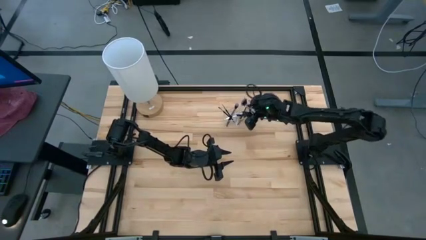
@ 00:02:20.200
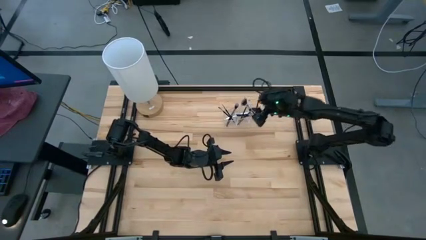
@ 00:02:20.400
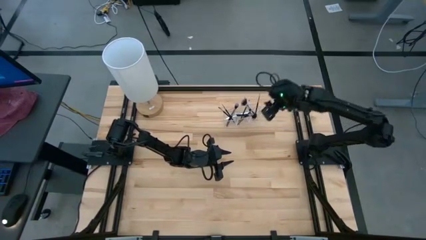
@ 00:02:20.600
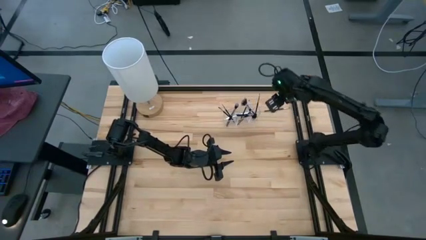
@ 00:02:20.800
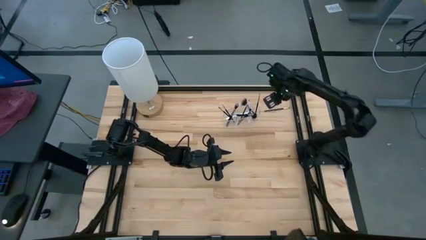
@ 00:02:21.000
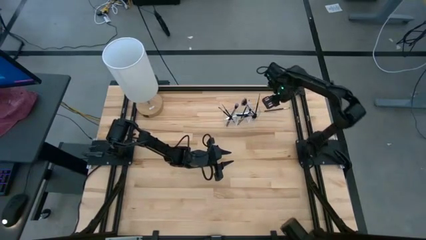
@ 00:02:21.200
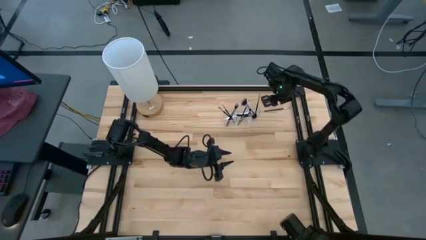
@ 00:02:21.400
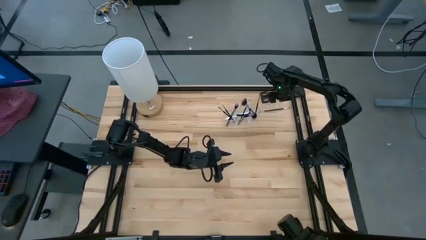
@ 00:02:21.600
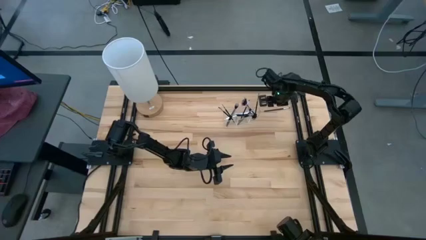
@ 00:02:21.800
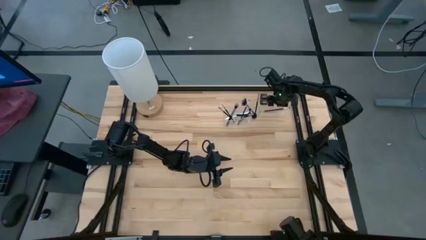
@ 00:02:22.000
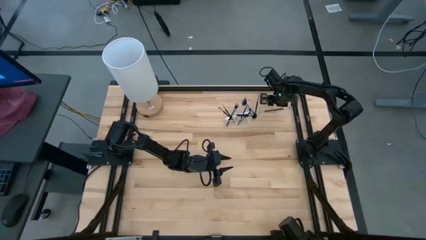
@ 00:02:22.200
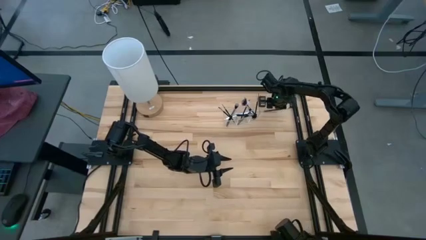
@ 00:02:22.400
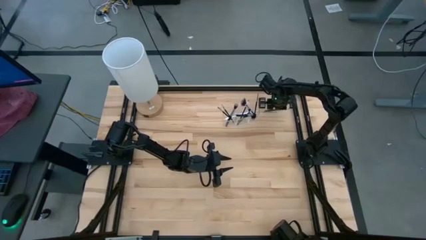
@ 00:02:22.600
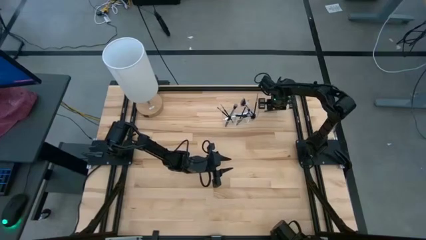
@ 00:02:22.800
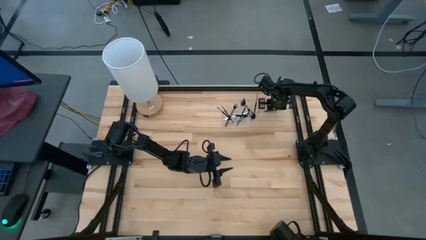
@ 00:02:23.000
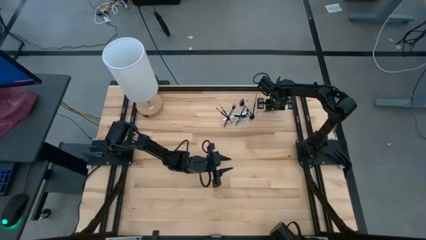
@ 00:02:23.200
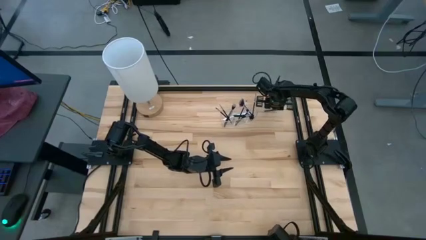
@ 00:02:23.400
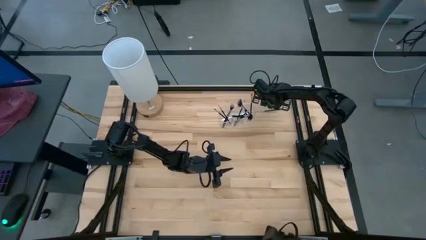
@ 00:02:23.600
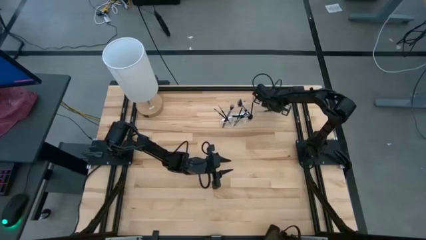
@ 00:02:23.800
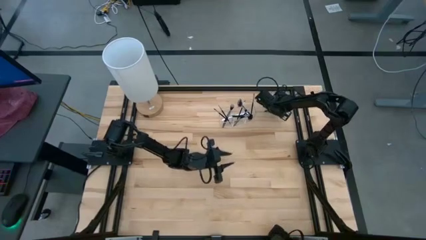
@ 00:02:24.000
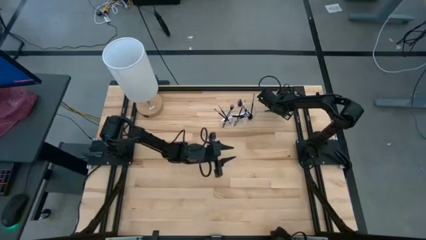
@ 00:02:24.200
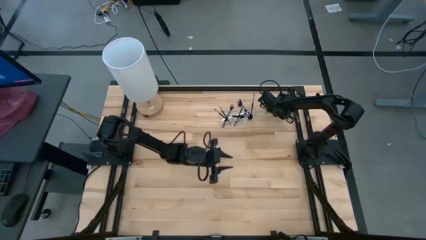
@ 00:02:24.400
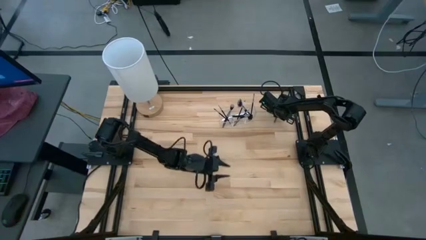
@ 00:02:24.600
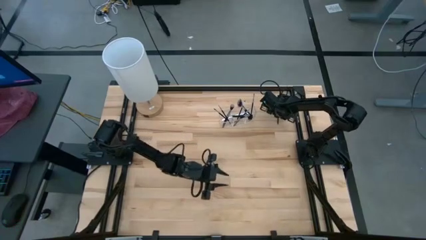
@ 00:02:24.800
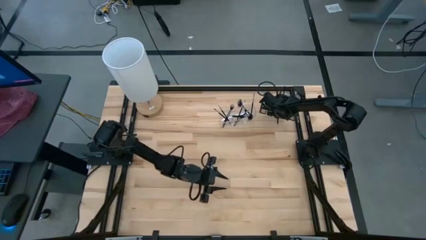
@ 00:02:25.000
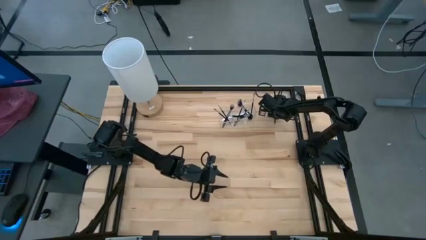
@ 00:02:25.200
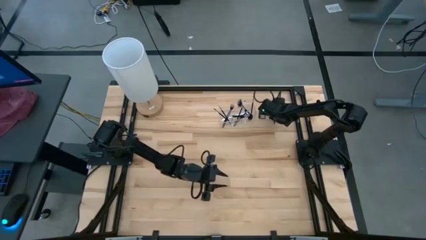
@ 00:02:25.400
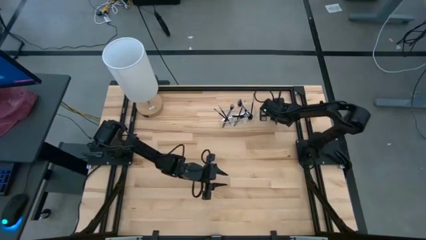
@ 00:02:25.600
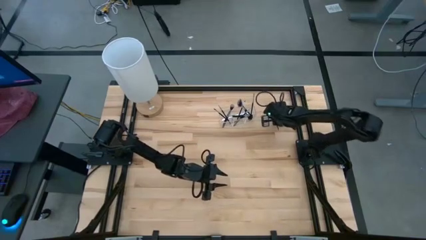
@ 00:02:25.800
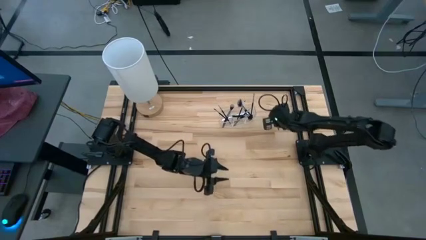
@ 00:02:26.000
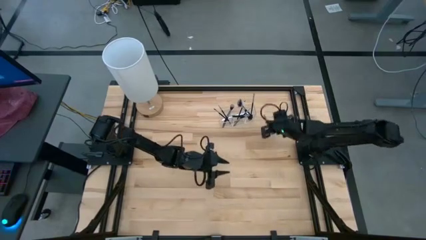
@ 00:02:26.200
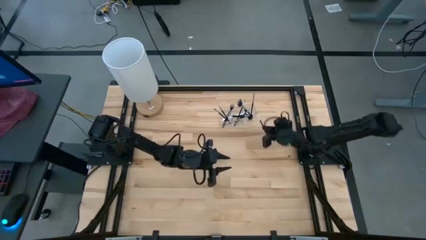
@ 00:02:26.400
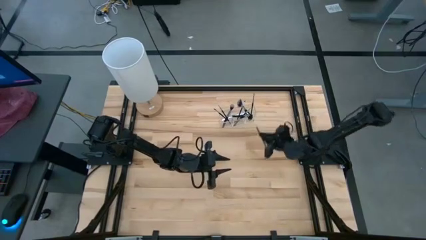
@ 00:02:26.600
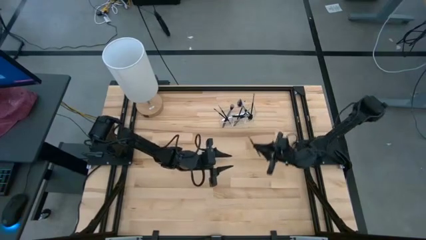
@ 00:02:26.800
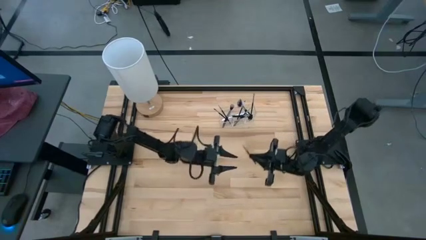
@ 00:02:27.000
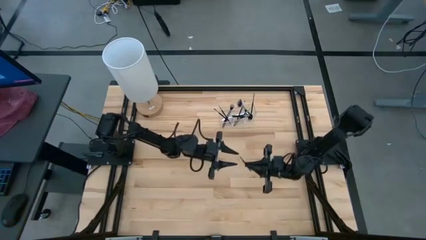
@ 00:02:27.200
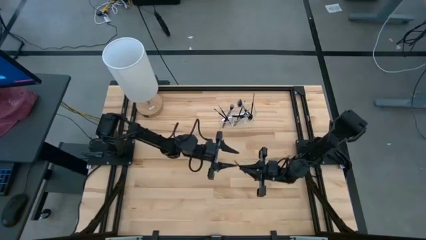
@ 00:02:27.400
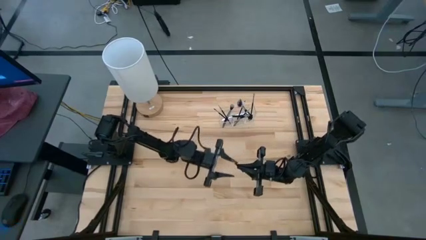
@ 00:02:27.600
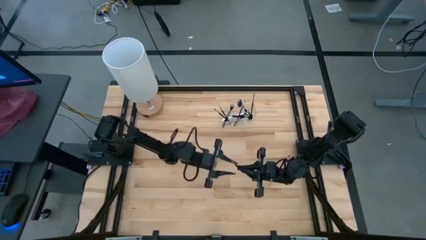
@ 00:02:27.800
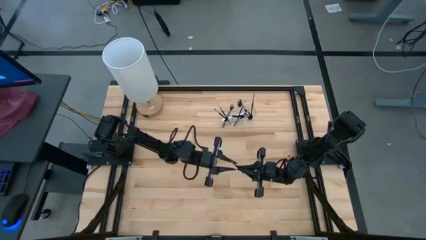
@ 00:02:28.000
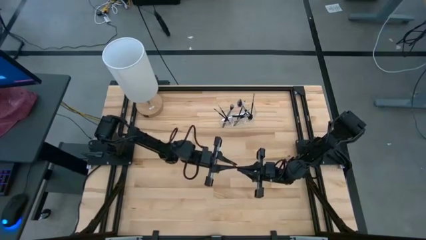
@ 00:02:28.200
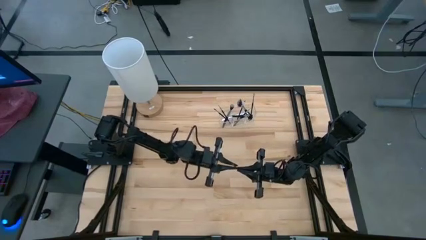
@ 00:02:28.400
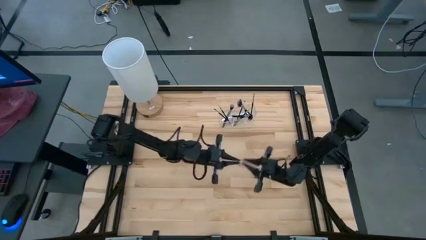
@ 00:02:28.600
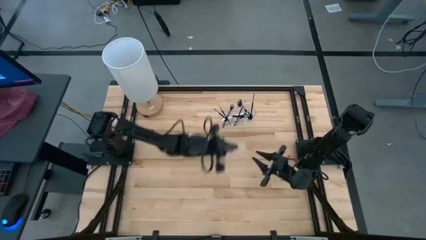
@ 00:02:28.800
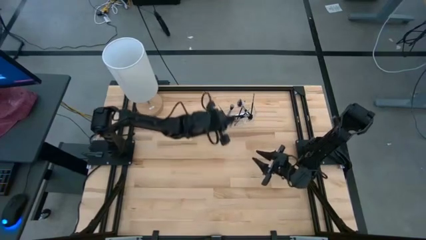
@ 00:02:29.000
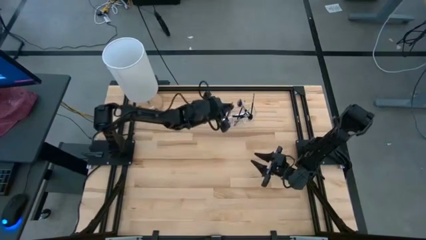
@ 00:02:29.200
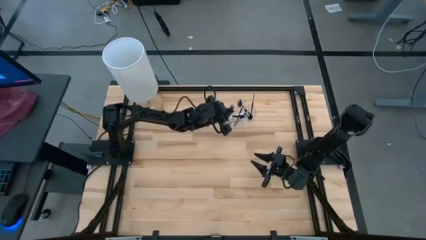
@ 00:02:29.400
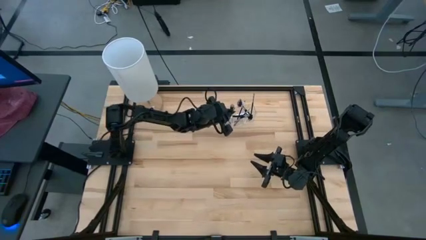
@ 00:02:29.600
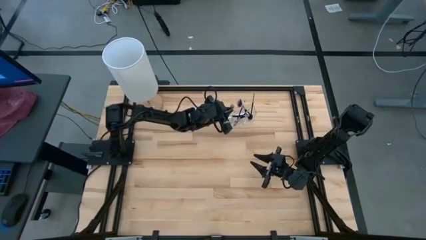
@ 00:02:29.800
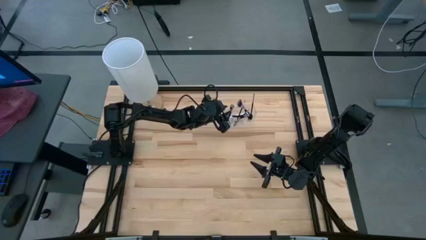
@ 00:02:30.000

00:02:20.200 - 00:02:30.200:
Task: Put items in baskets/containers
Put the black eyeshadow brush into the transparent organizer

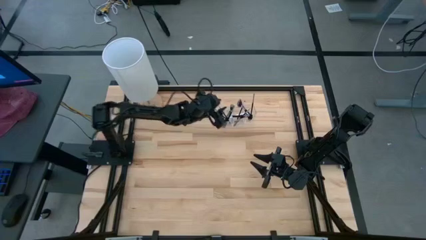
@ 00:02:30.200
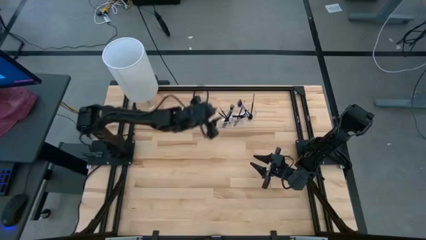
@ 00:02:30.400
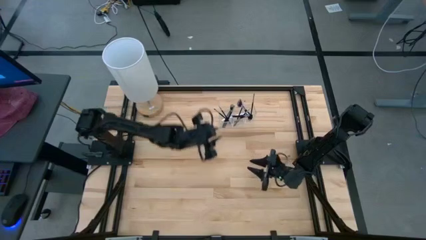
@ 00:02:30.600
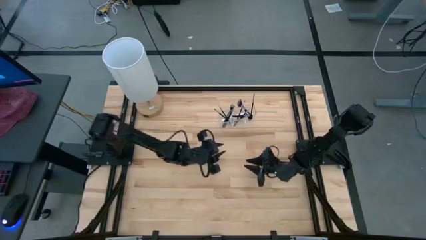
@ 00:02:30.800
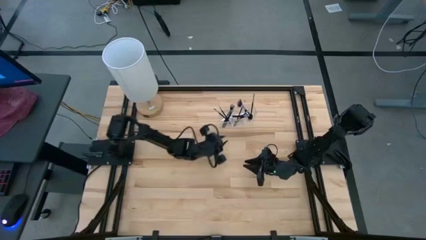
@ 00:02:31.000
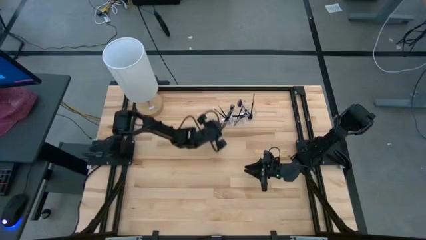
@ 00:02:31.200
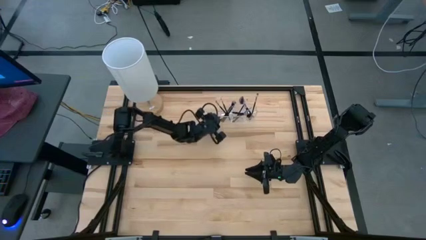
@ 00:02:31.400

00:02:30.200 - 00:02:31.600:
Adjust the transparent organizer
